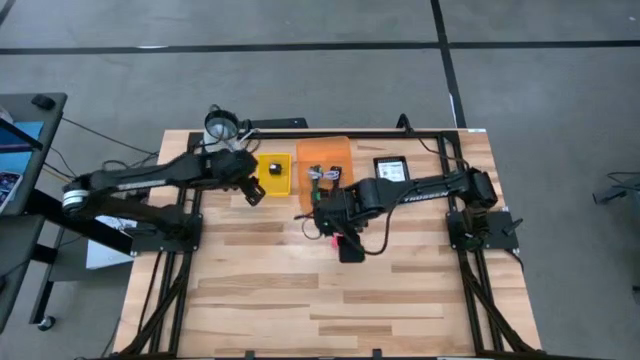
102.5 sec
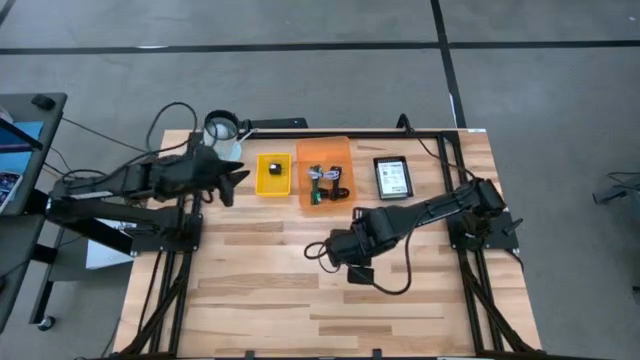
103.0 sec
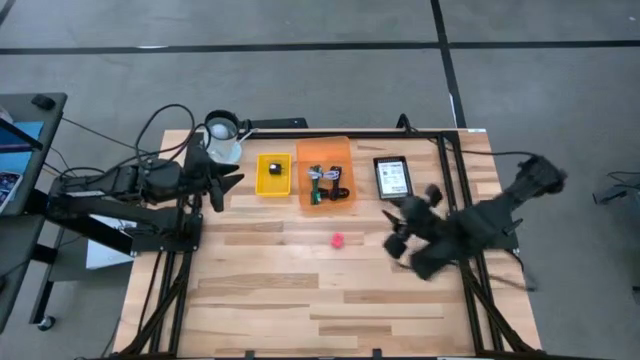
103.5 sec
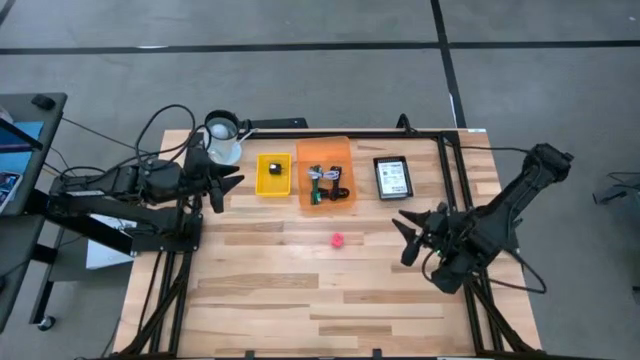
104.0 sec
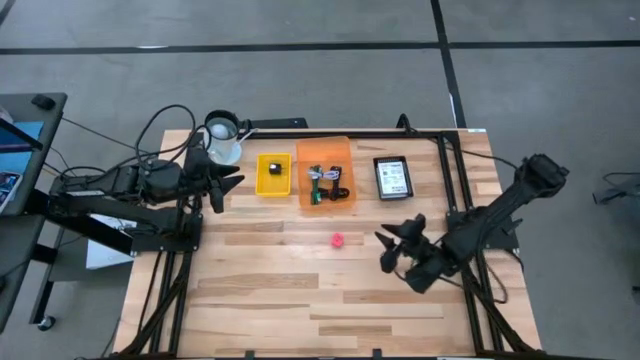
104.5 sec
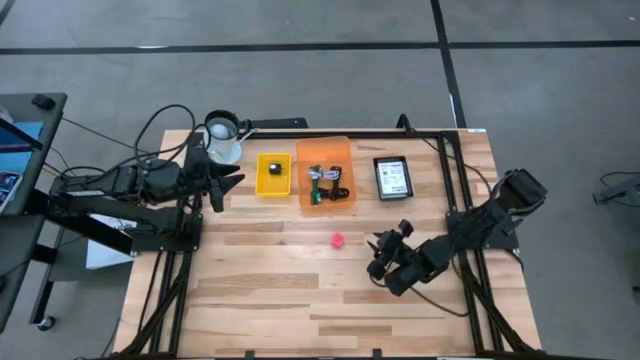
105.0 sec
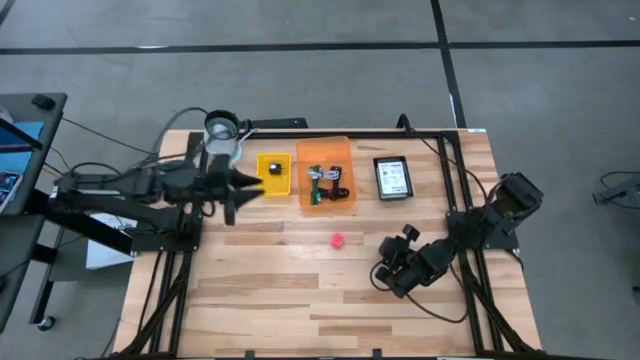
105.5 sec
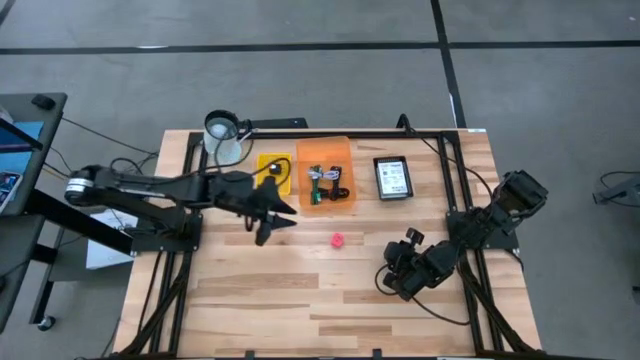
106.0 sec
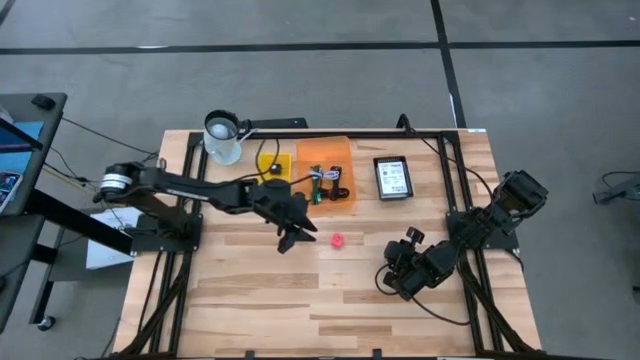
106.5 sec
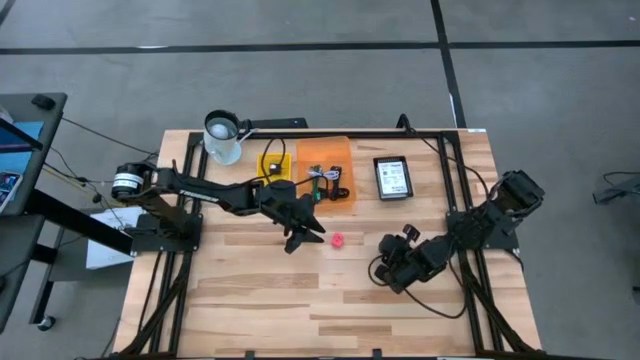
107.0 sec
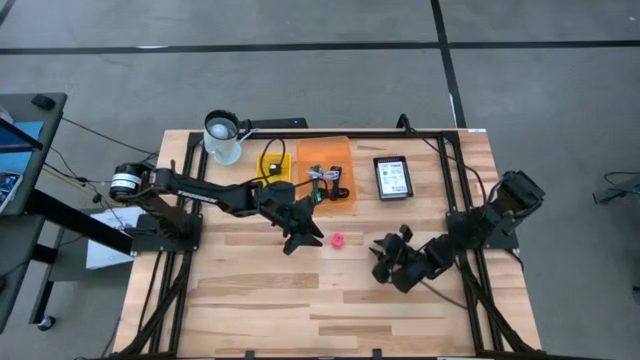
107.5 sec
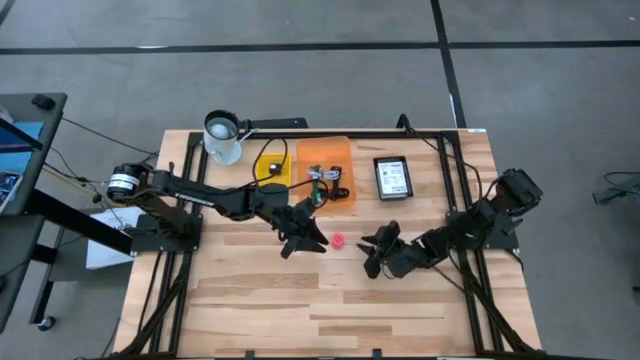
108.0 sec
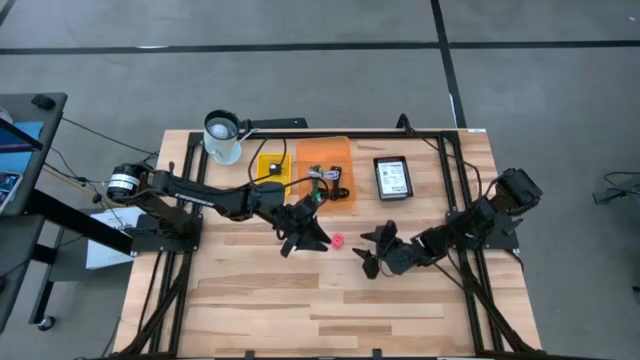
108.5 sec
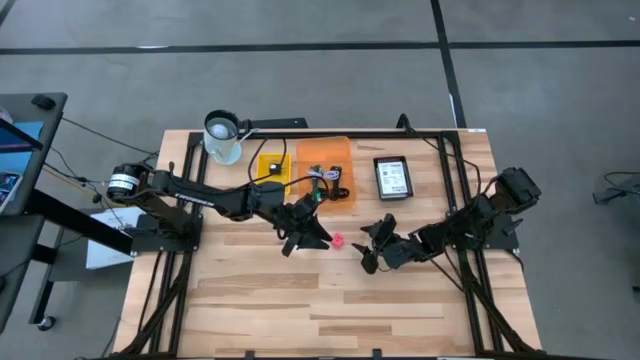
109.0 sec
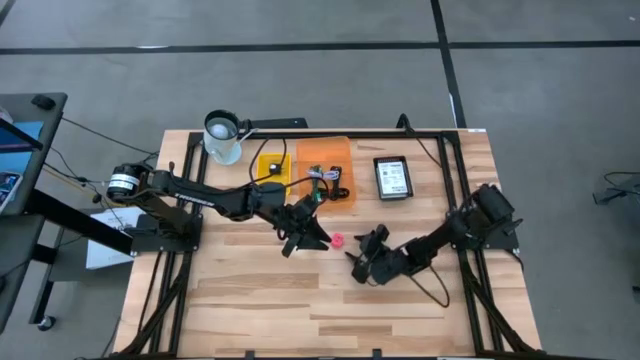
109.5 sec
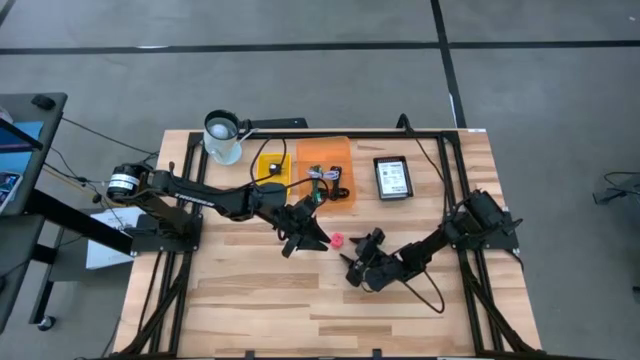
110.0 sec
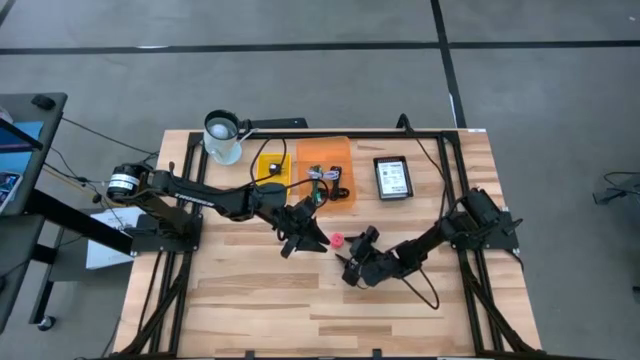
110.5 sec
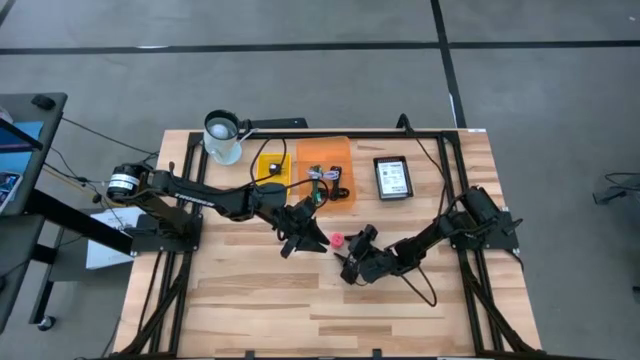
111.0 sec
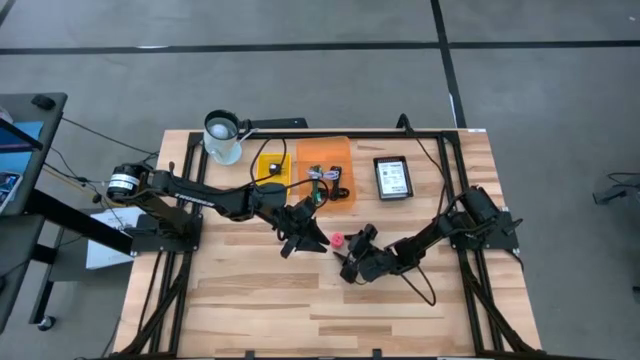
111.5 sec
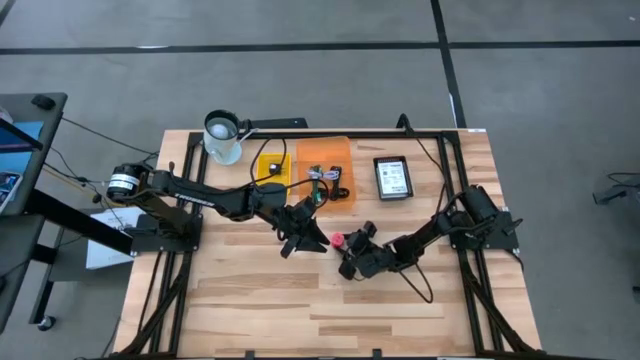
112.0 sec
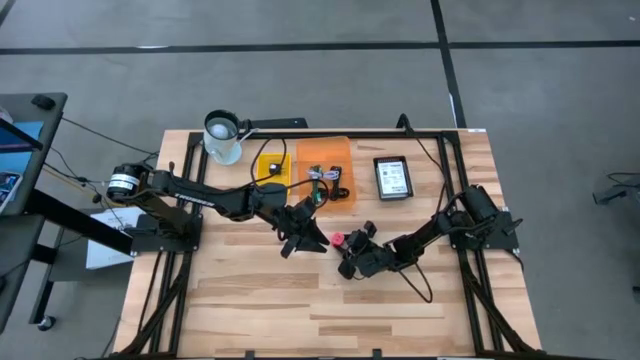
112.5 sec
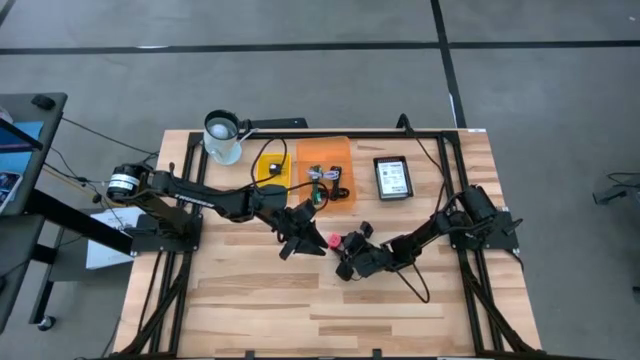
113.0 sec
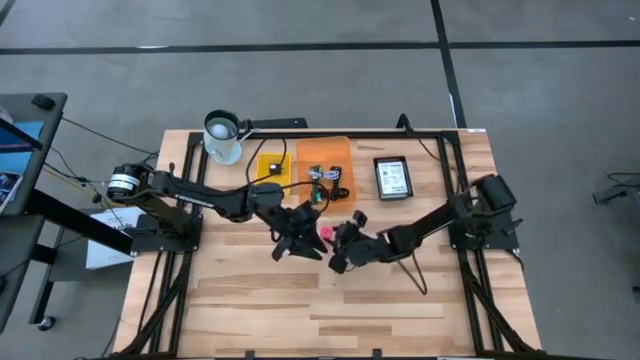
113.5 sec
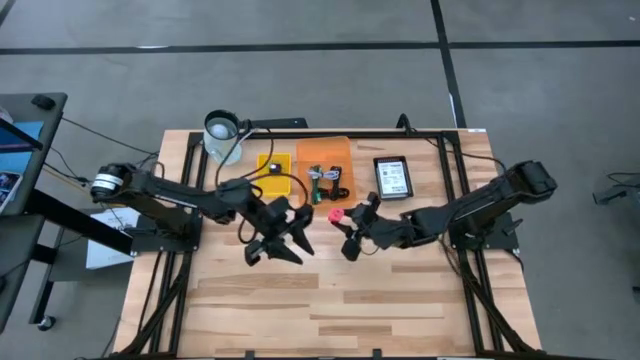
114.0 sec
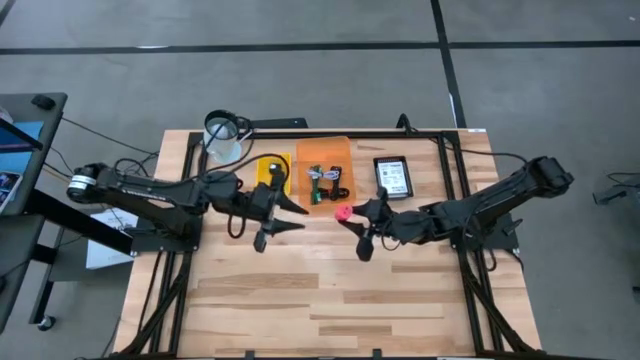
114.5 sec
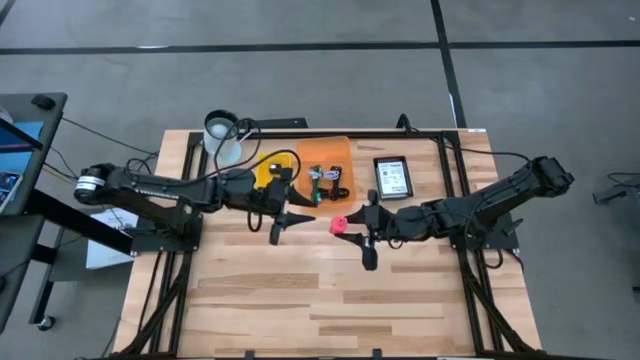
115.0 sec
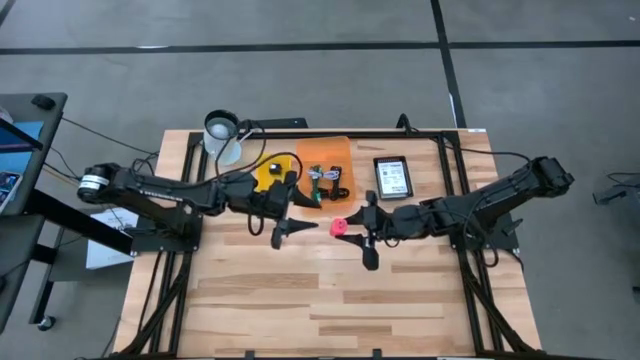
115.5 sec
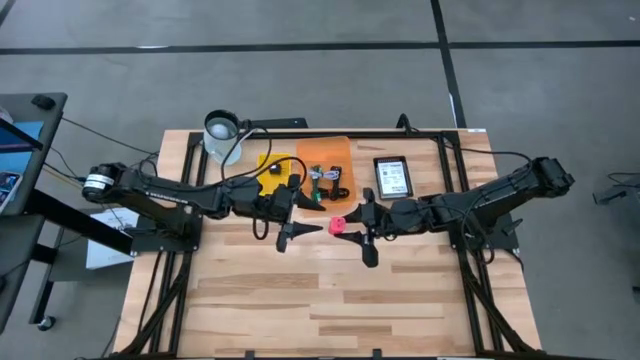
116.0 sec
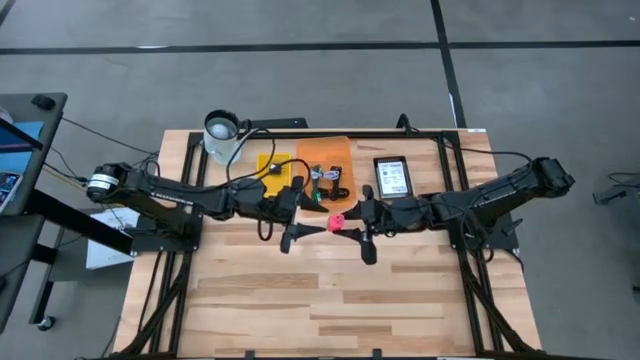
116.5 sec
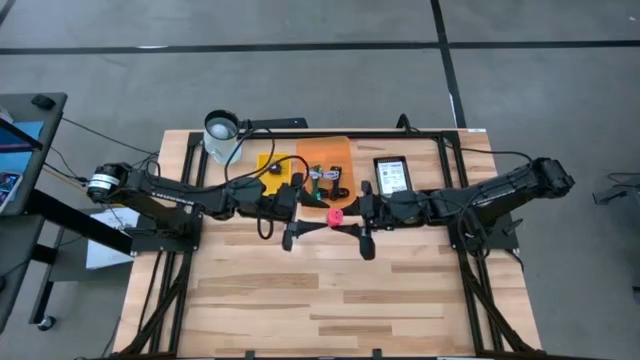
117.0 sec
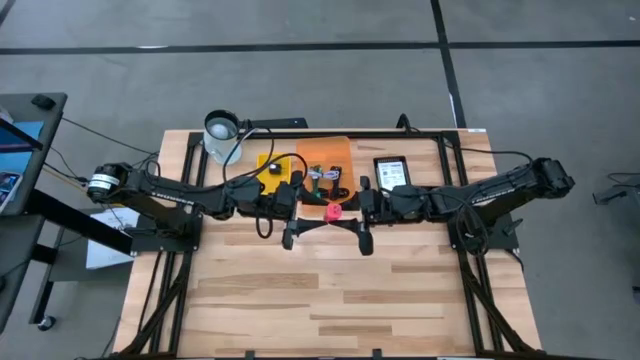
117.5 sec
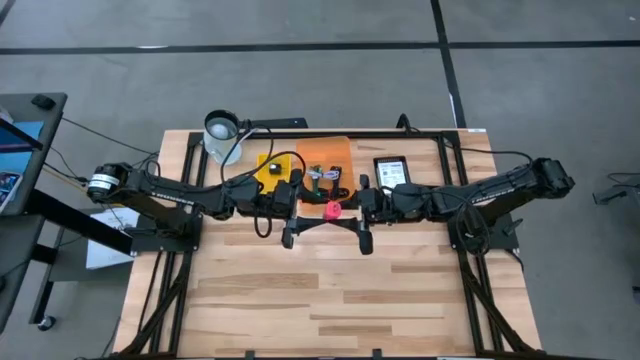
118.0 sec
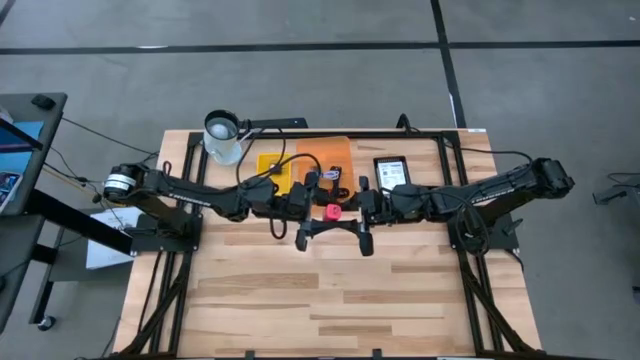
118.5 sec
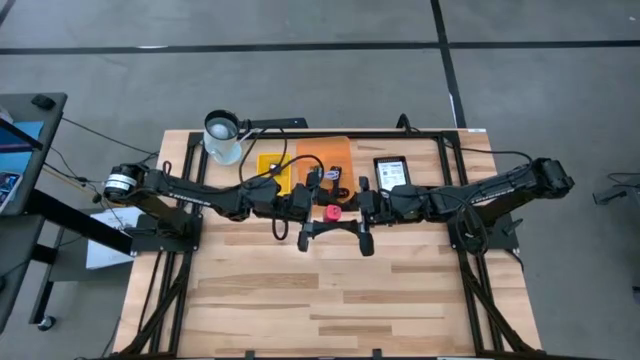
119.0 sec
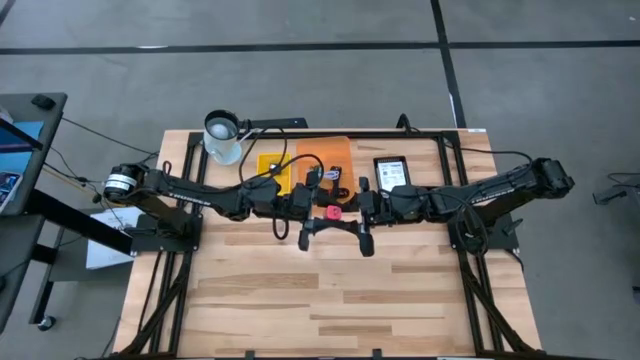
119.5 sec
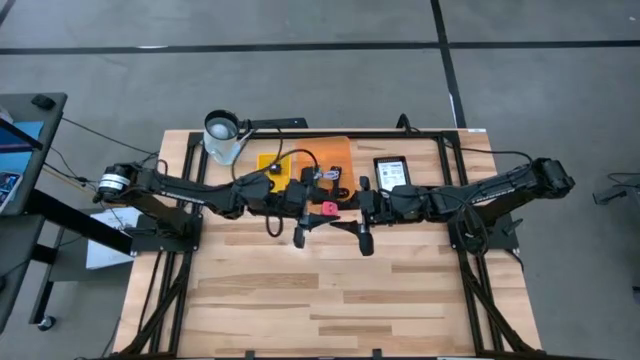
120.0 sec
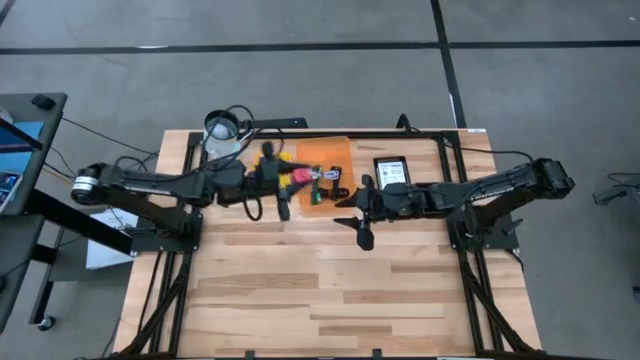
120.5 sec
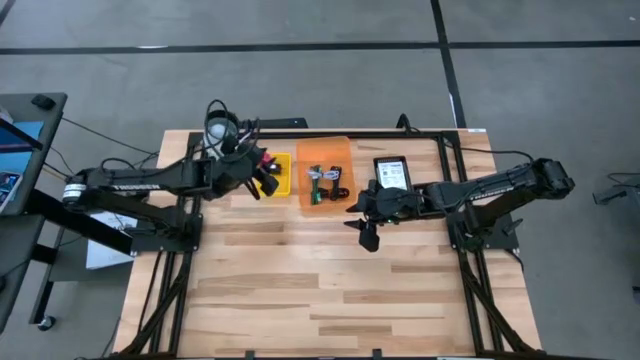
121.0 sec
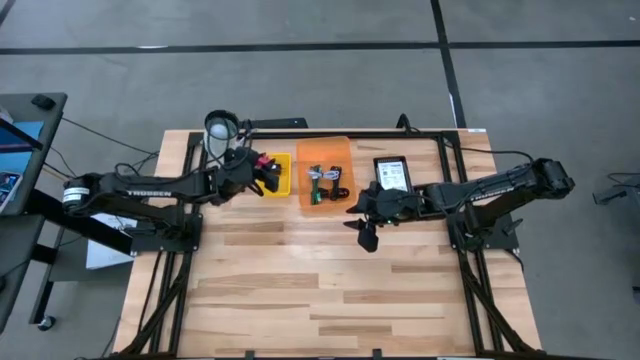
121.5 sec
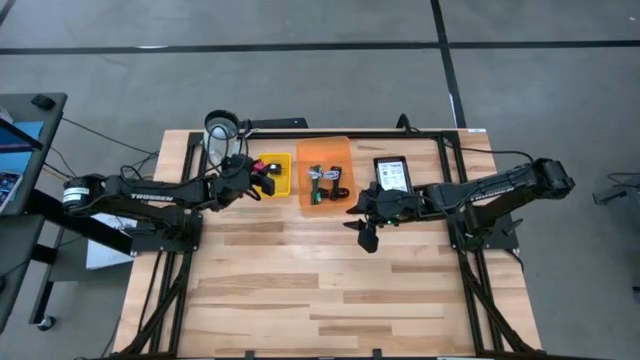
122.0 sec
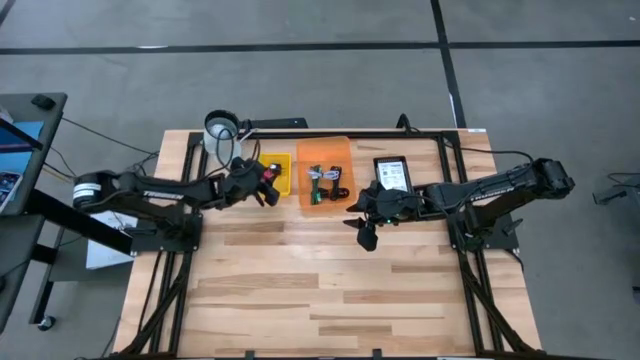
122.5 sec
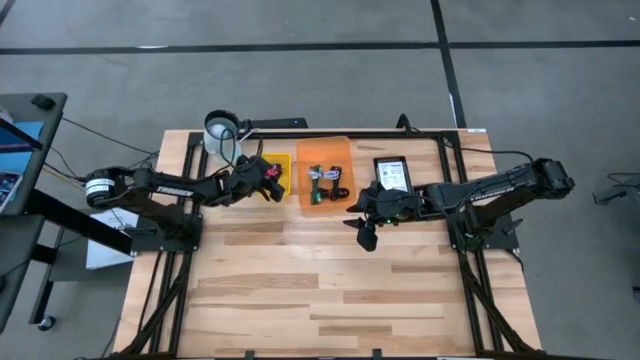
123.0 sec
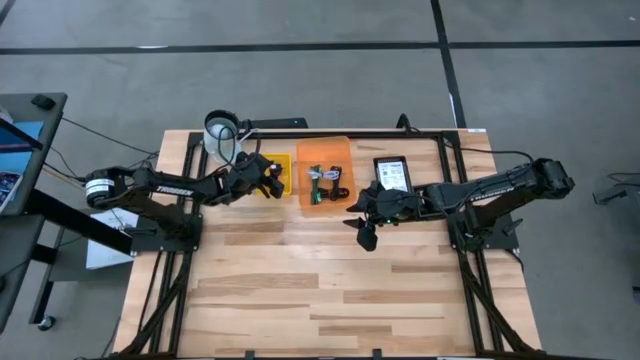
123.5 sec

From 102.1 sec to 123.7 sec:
Task: Pick and place items into bin
Put the pink charger adapter into the yellow bin
